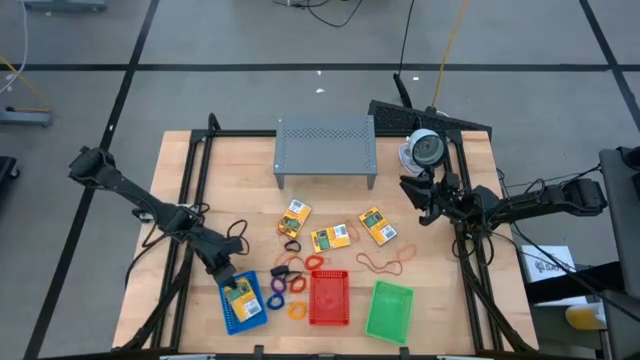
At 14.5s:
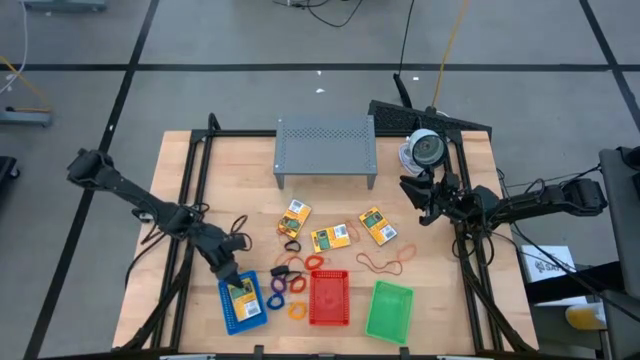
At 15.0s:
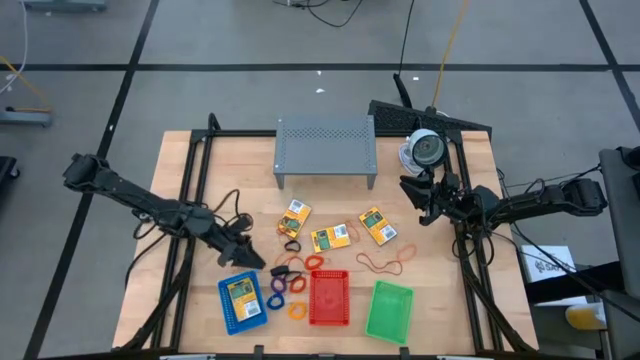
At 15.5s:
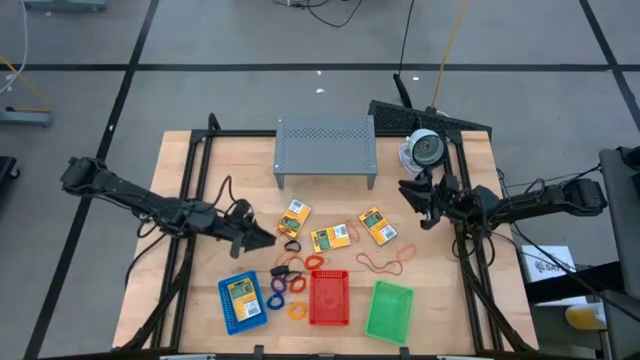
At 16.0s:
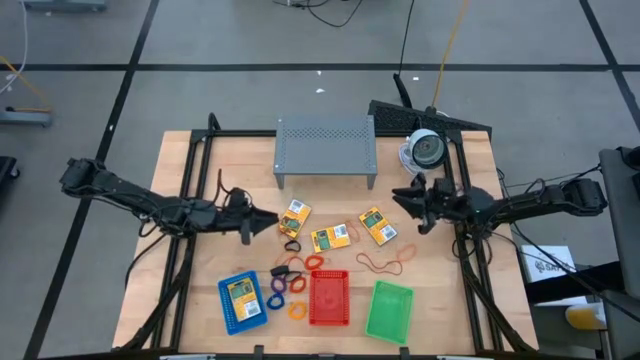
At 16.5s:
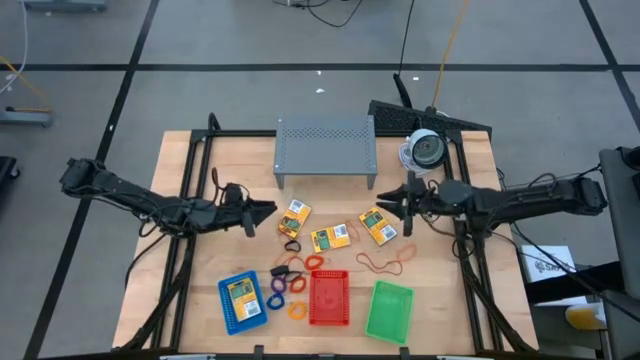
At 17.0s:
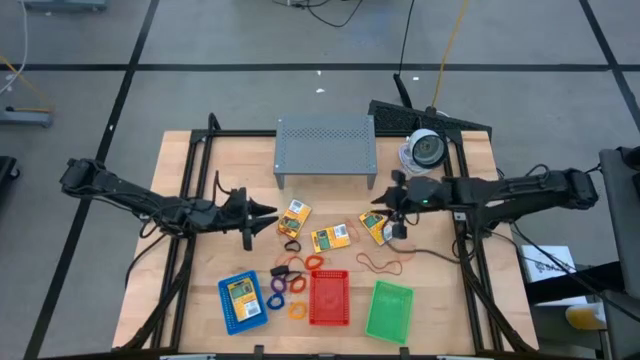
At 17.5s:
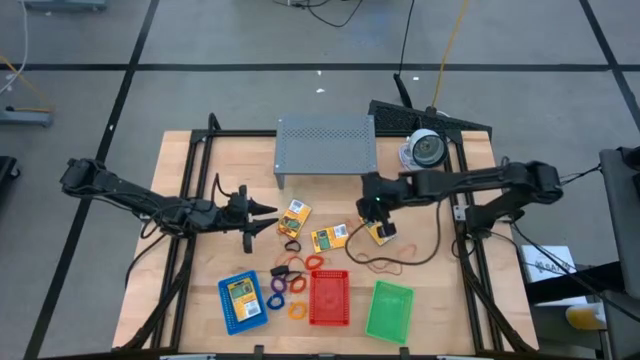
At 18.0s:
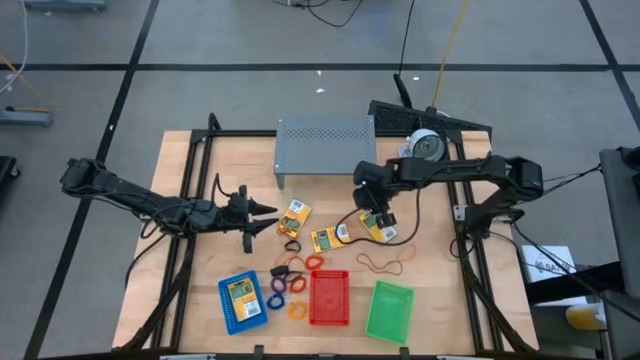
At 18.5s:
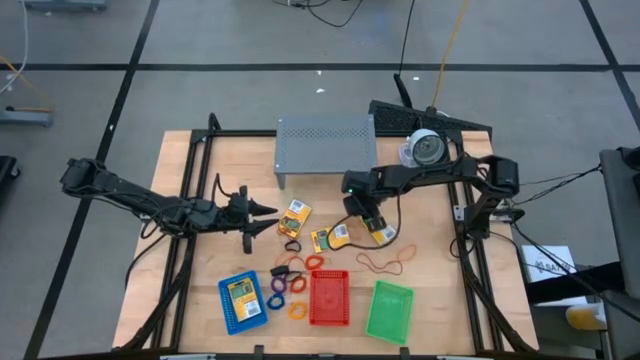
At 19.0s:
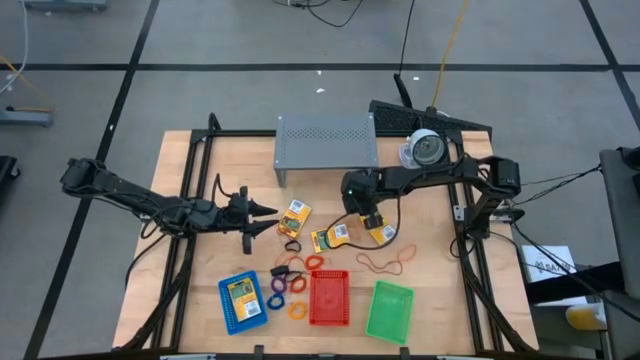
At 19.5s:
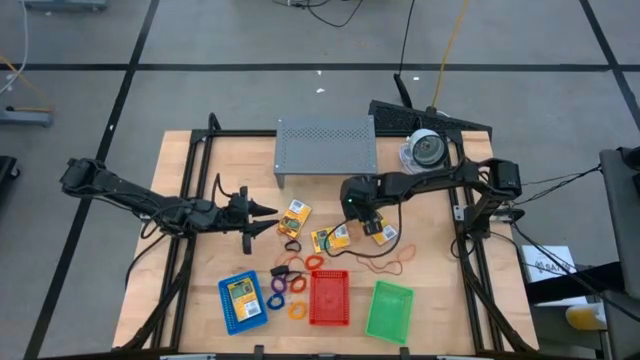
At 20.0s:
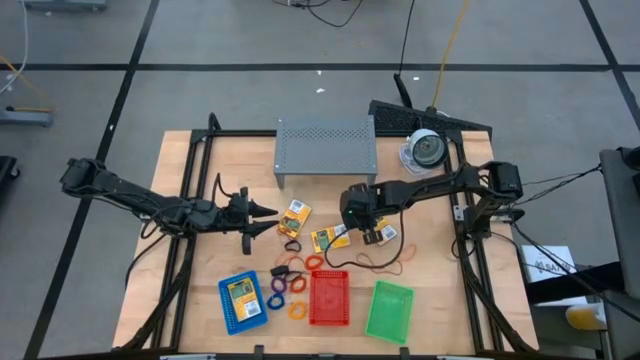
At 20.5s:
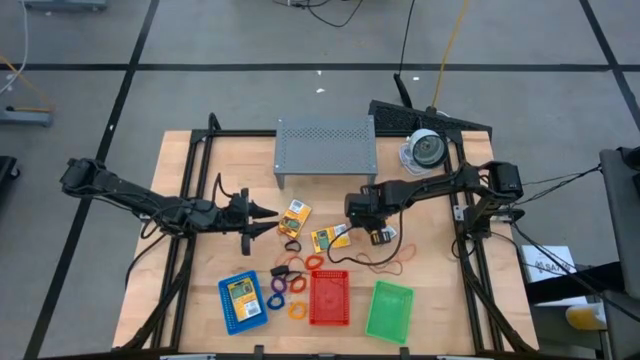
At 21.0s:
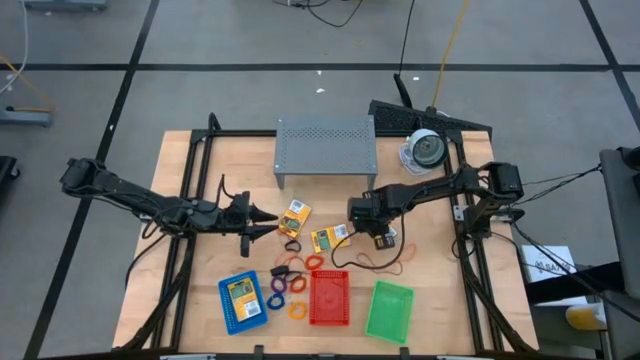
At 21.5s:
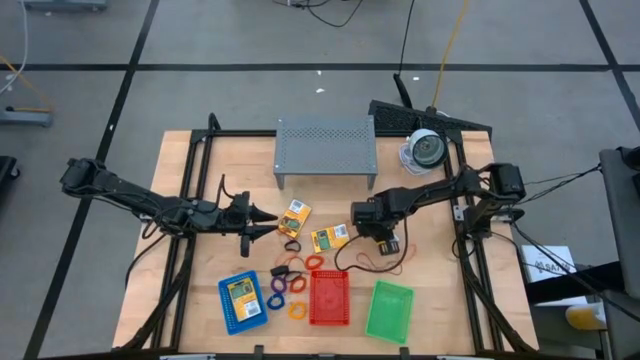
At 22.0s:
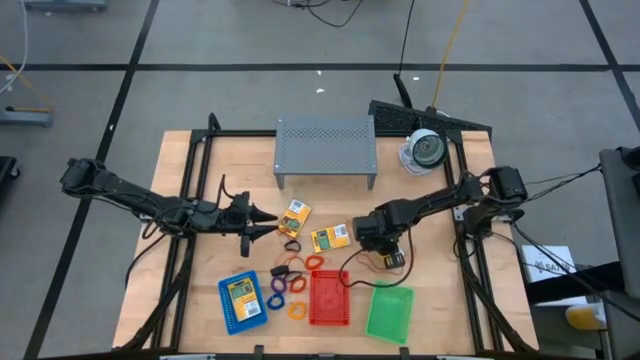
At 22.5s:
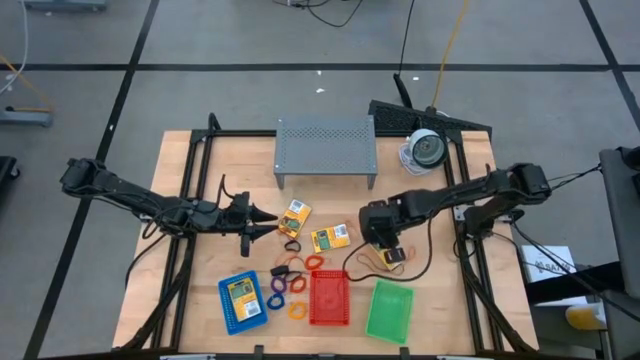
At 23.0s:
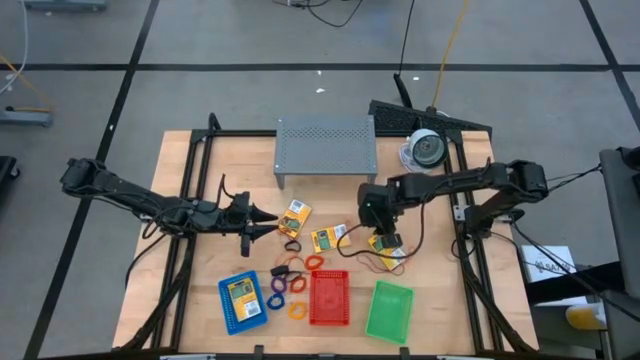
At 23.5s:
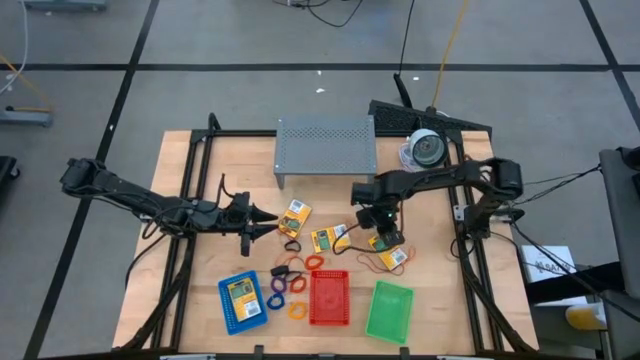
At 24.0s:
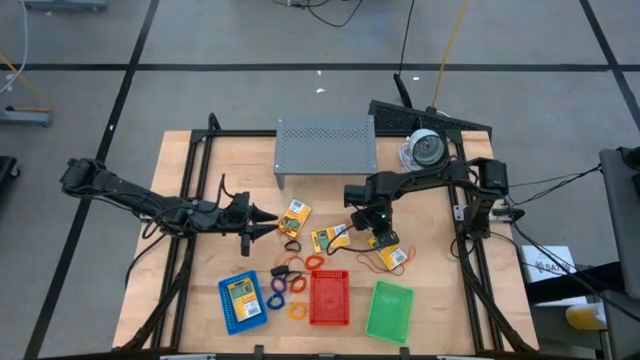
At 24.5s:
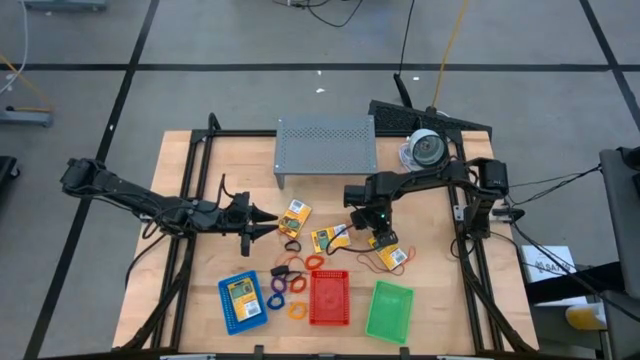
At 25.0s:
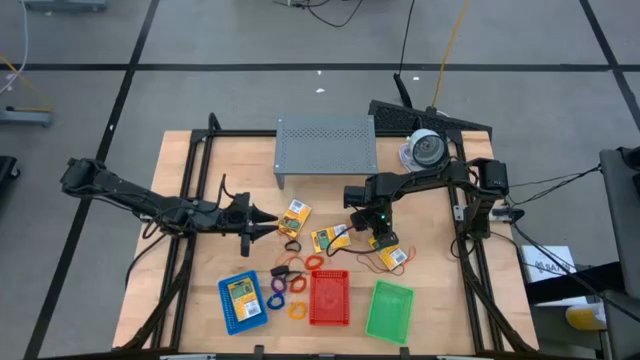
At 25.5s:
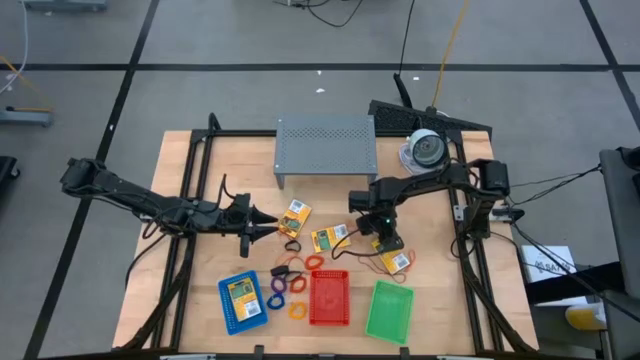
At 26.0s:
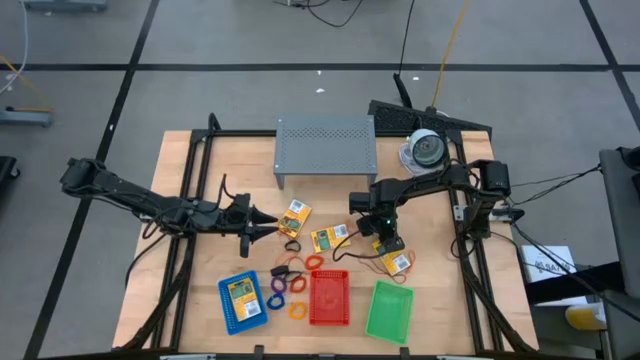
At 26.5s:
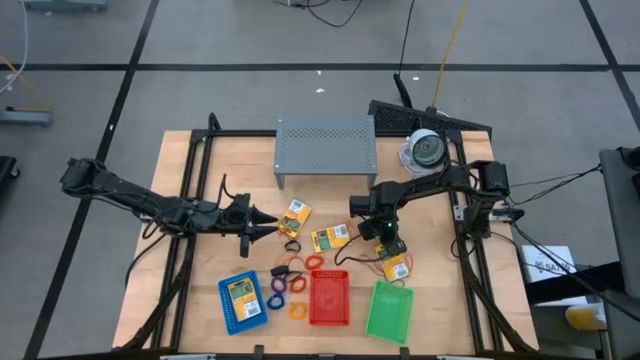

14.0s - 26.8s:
Task: Pick & Place Office Desk Supplies
Put the crayon box into the blue bin

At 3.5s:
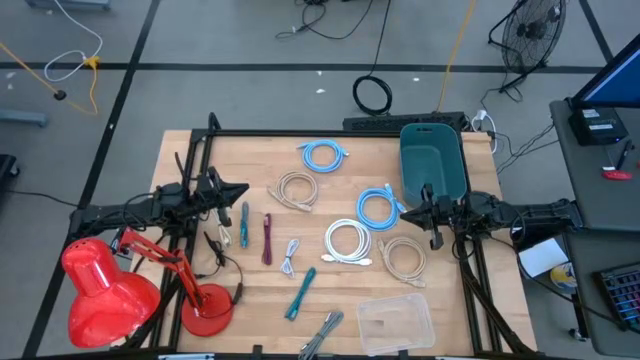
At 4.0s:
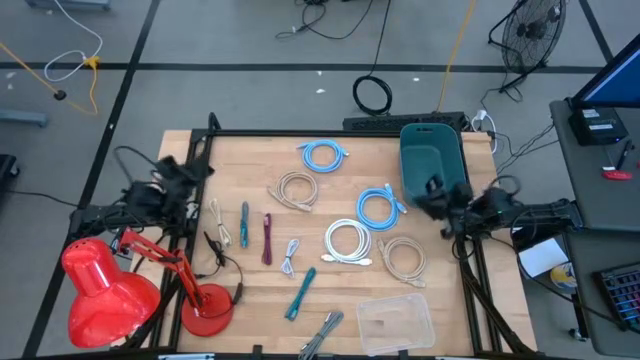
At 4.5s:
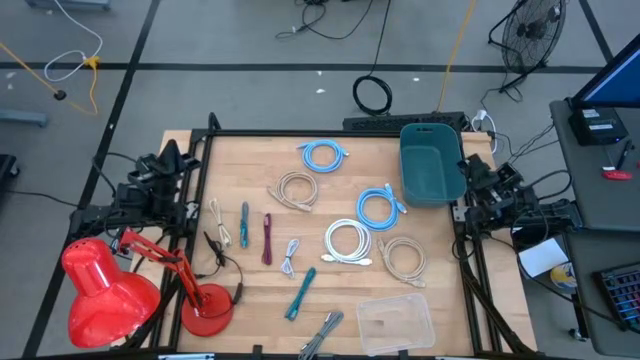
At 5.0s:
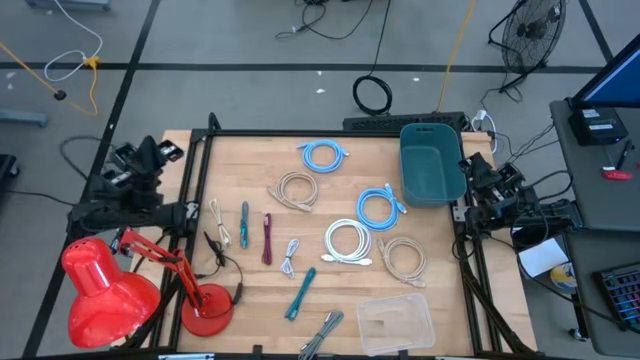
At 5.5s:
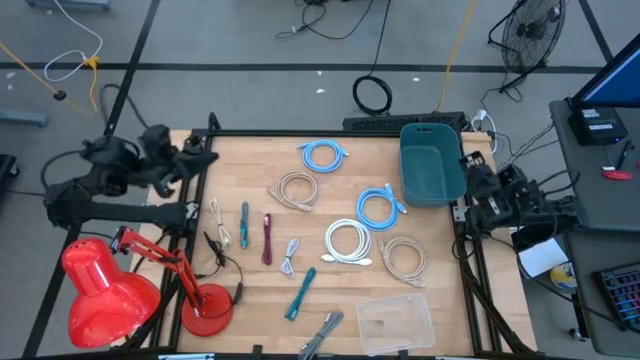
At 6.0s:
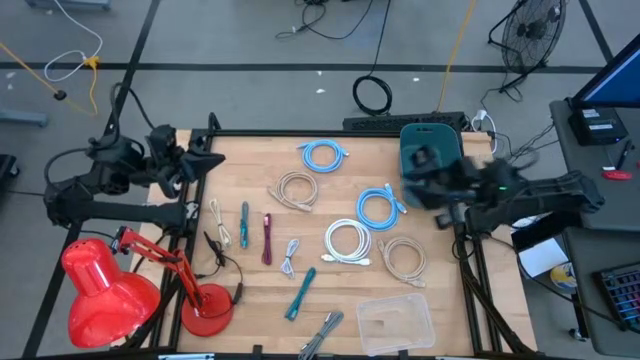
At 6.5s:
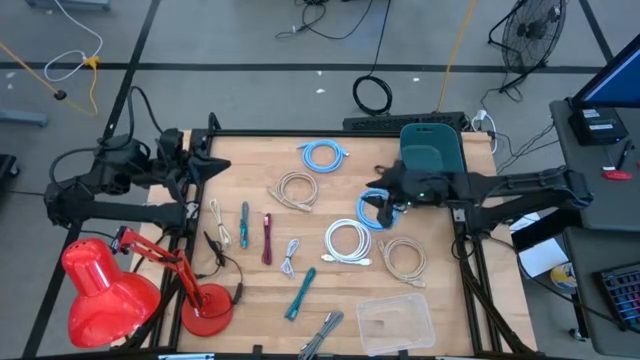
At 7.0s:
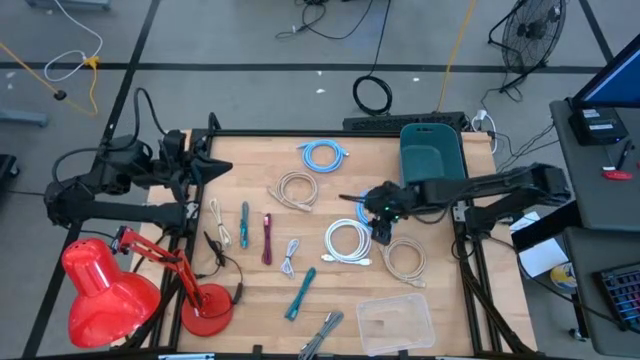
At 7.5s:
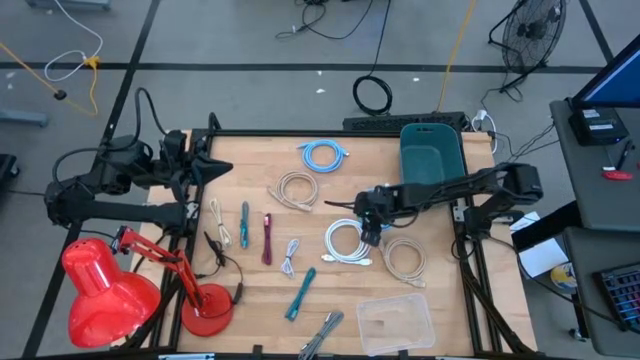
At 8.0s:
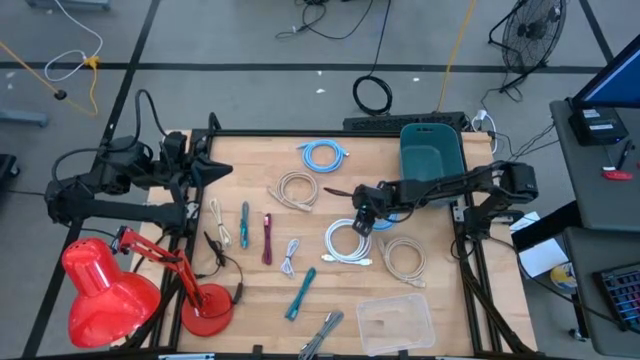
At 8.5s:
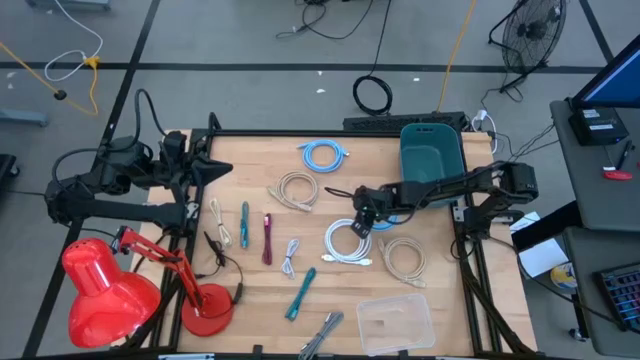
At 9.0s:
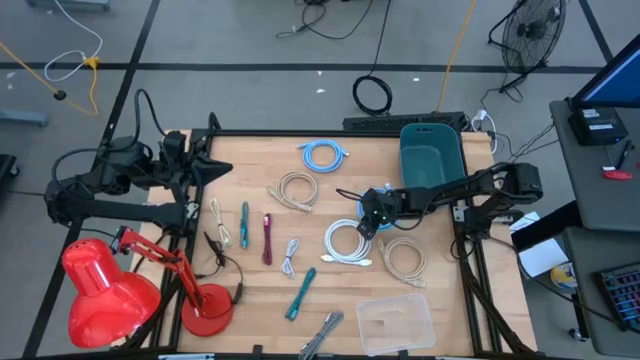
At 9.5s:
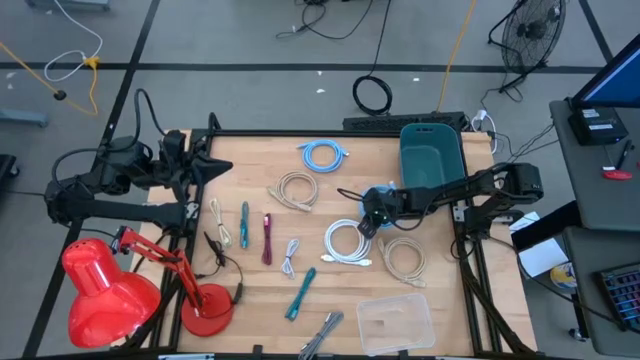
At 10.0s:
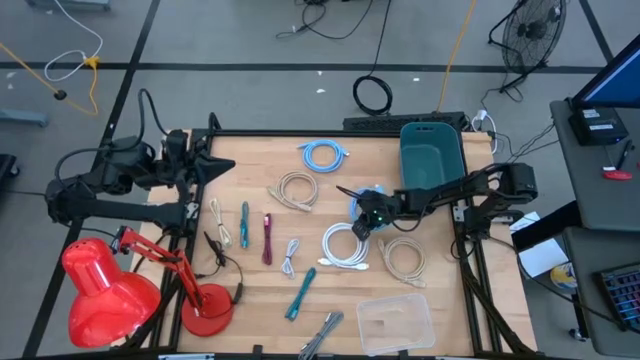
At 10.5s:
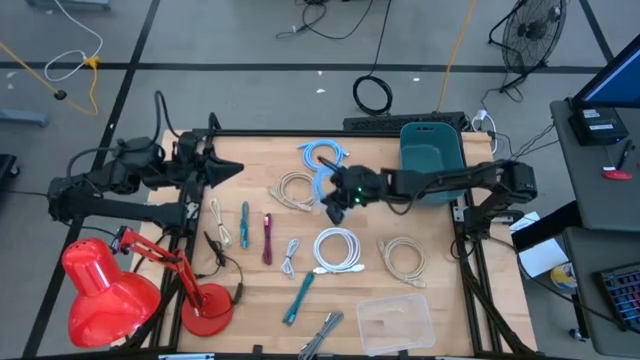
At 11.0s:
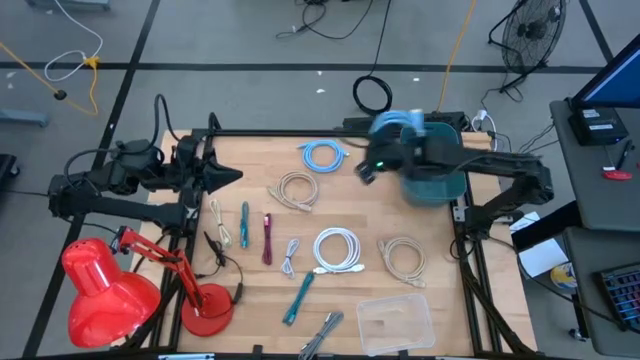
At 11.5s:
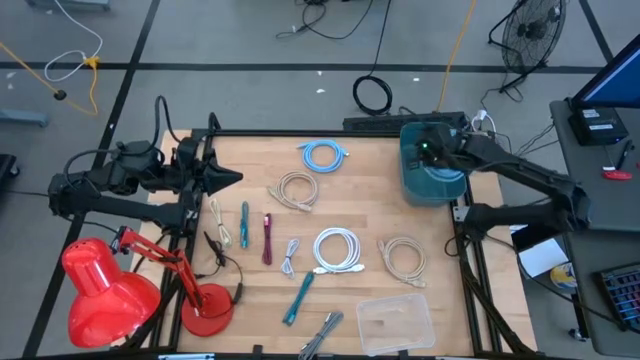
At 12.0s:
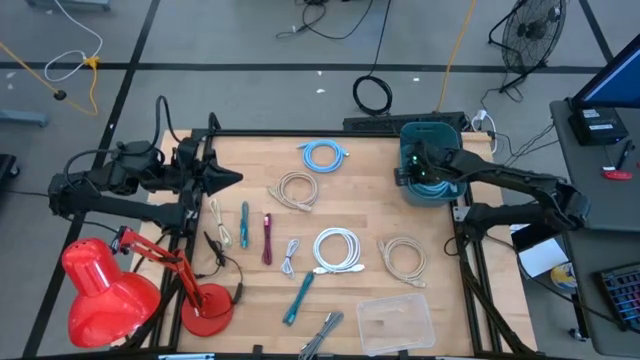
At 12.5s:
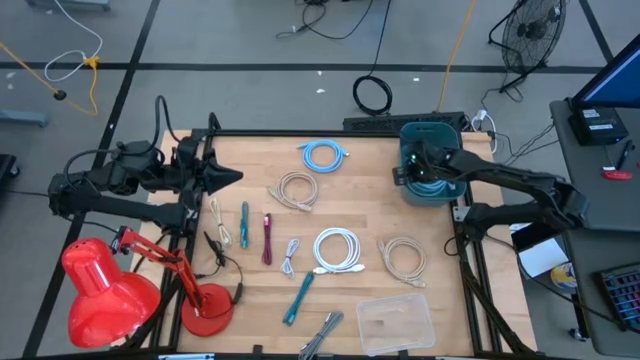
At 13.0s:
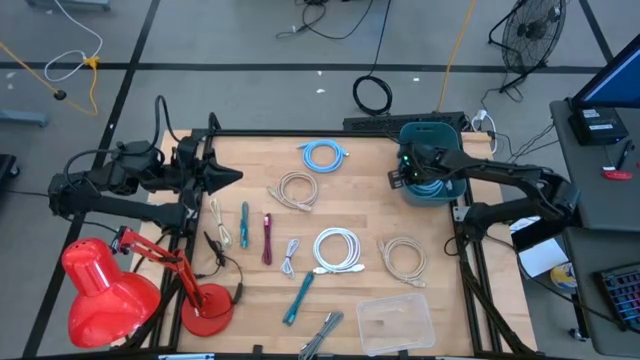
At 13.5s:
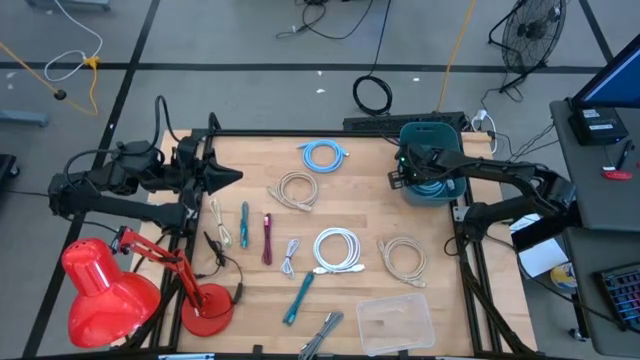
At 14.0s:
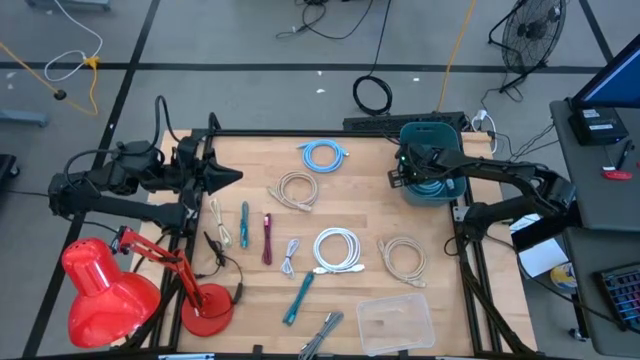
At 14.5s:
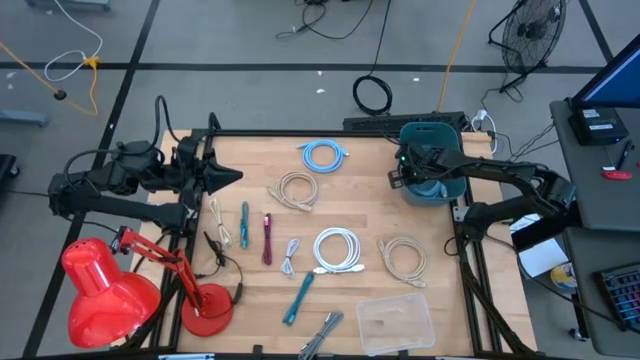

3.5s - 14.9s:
Task: Pick & Place USB Port
Put the bottom blue hdmi cable into the blue bin
